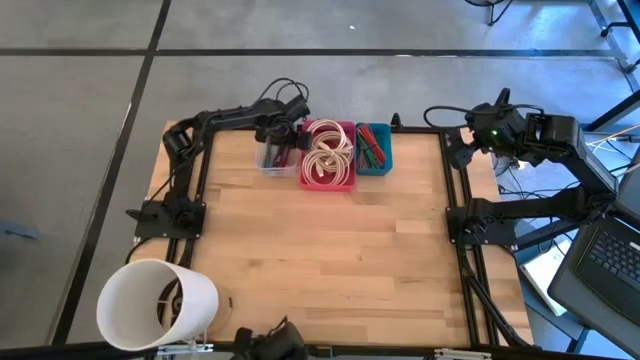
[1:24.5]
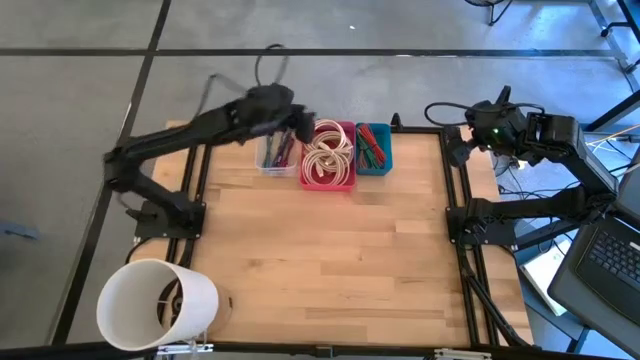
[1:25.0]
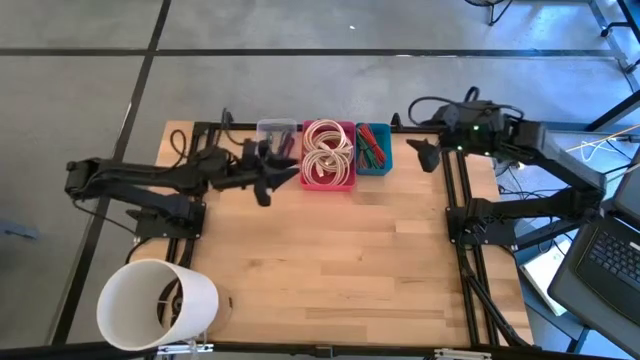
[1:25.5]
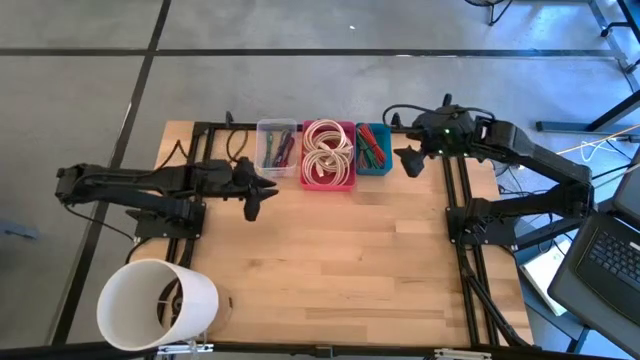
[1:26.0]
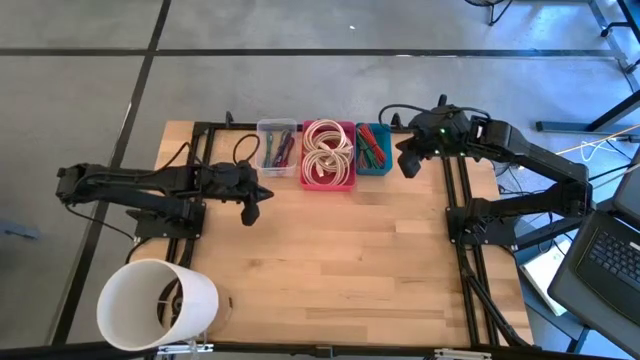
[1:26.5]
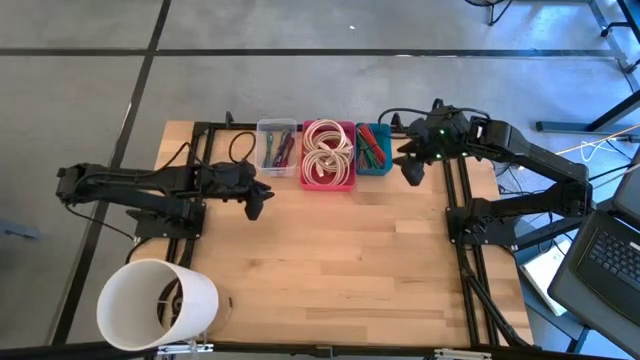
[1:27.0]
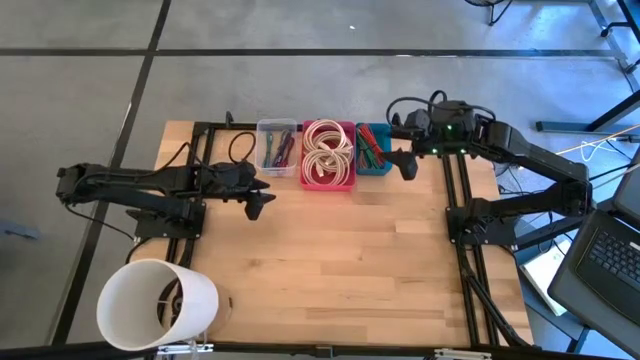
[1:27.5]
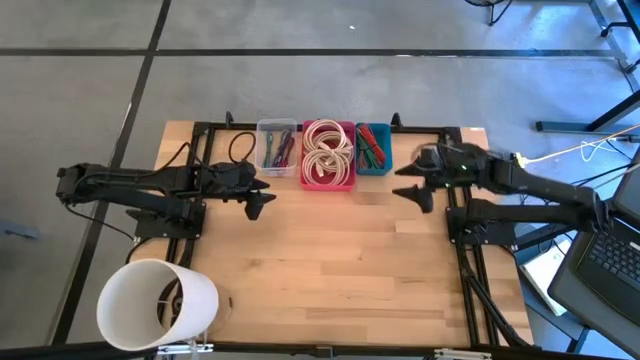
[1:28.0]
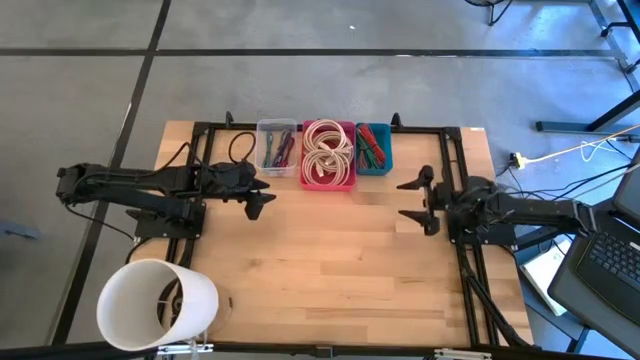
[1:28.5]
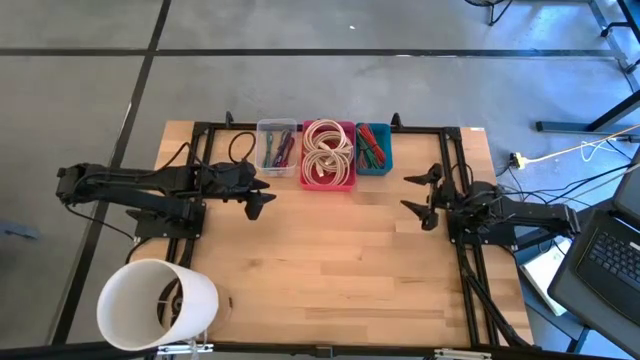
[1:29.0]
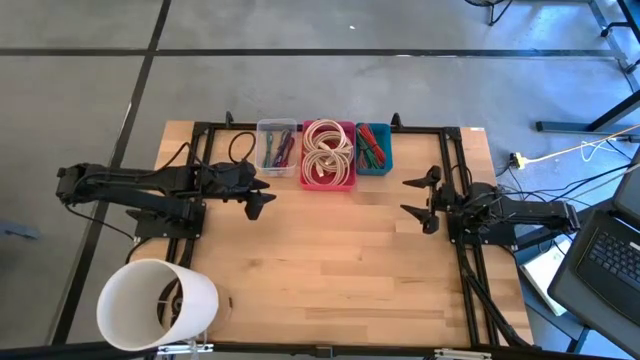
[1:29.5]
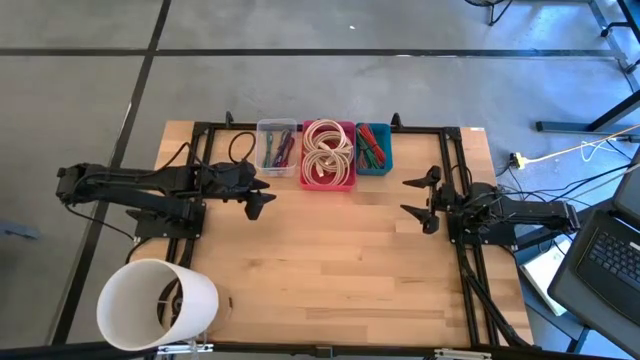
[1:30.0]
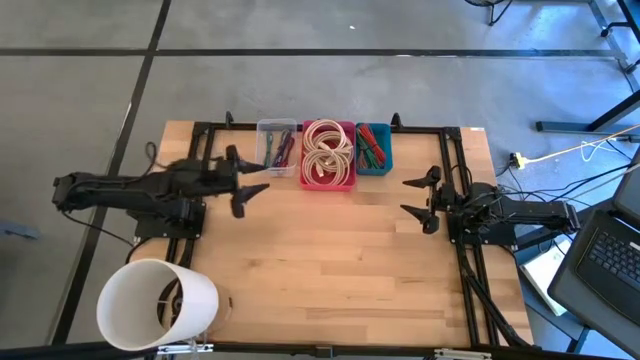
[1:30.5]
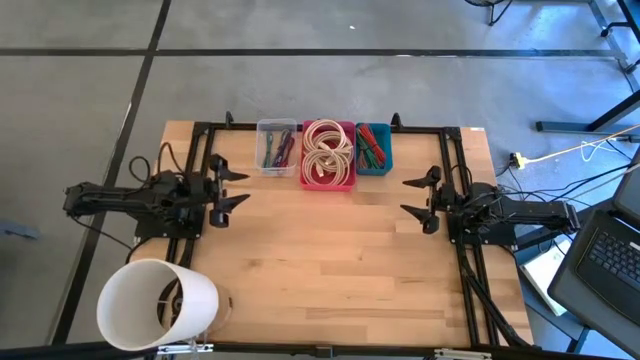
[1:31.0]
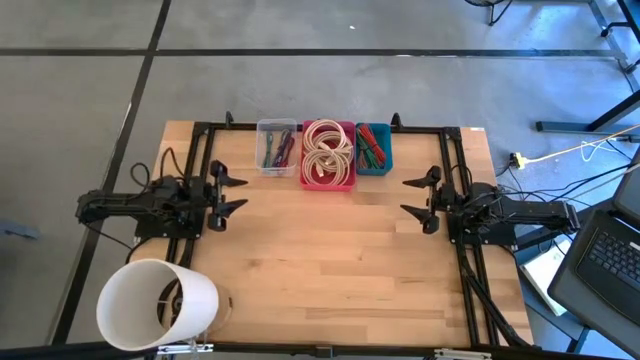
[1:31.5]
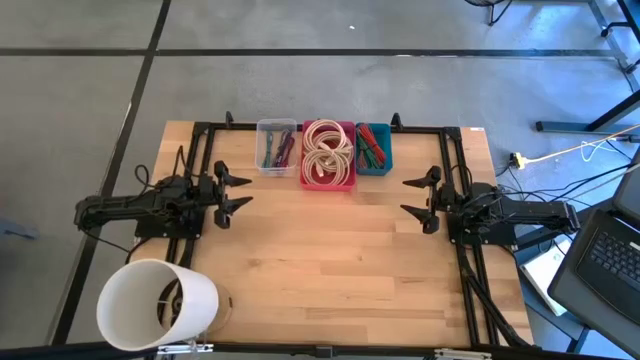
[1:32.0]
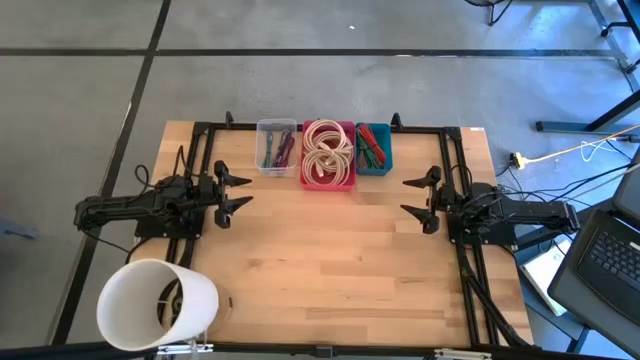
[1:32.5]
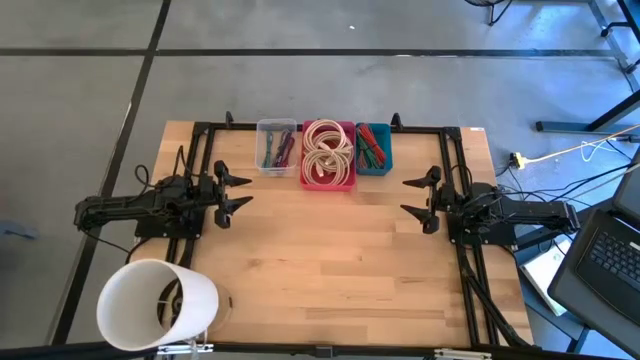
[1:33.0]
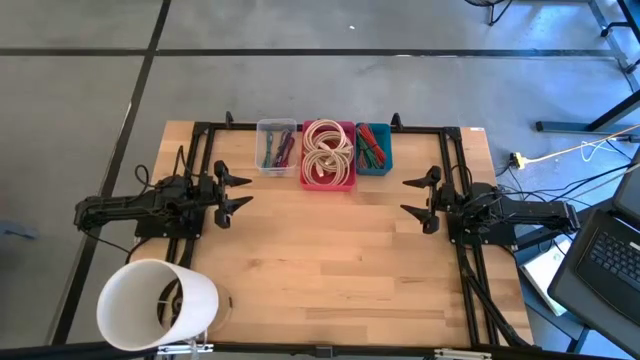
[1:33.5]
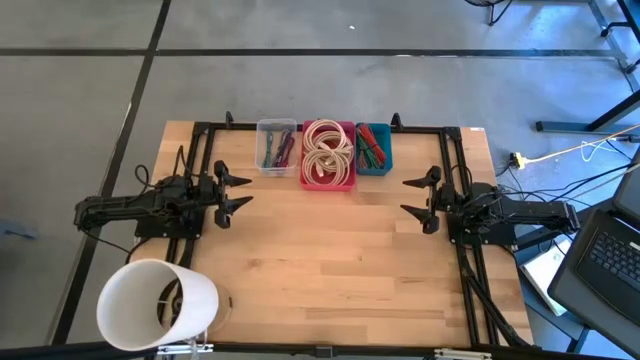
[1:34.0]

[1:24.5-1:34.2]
Task: Pick & Place USB Port
Return to Home Position

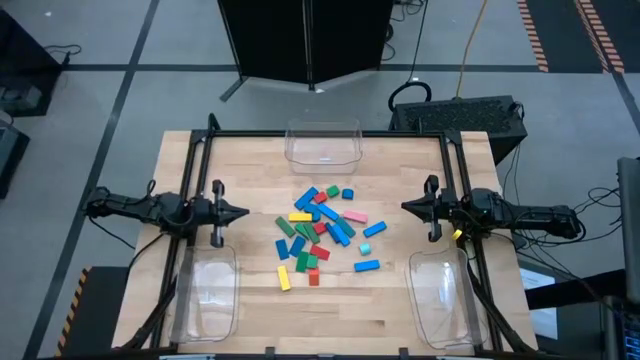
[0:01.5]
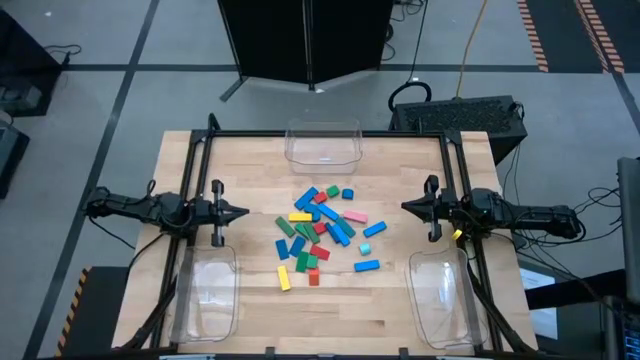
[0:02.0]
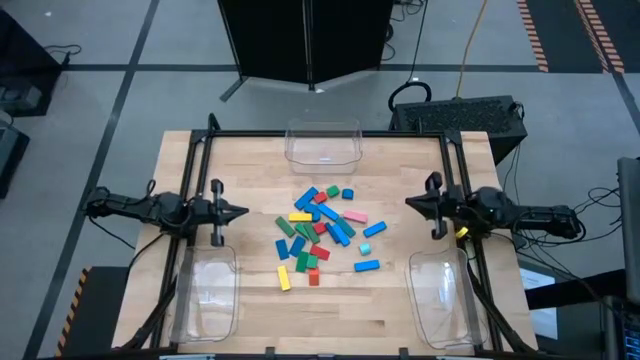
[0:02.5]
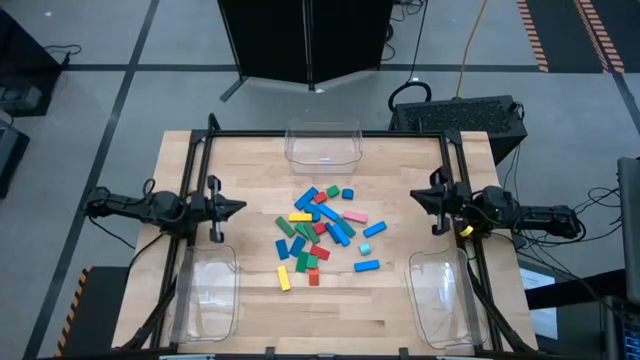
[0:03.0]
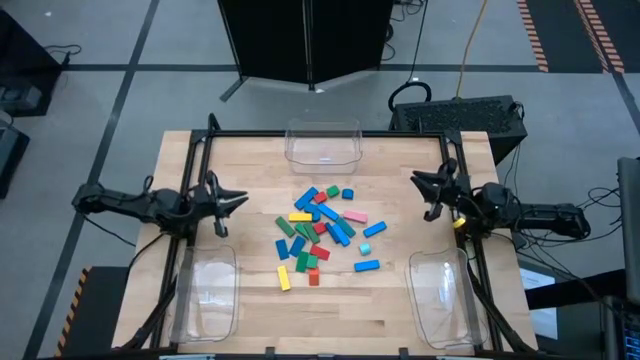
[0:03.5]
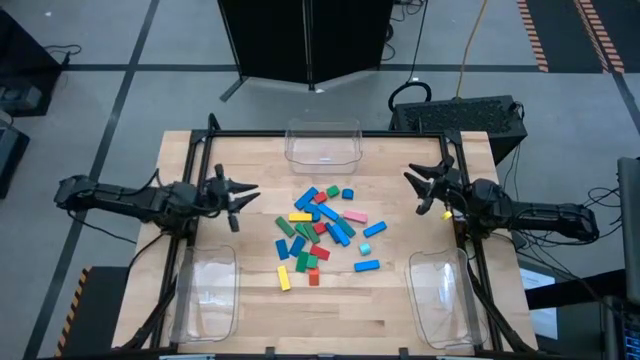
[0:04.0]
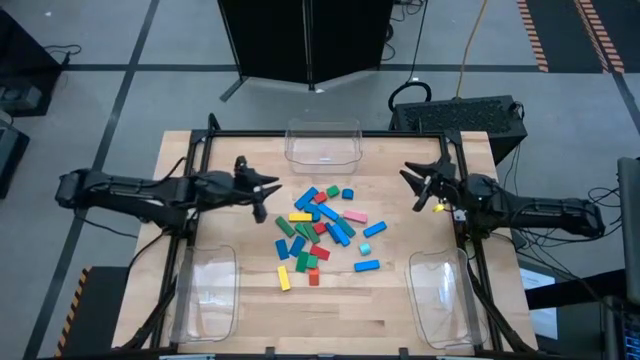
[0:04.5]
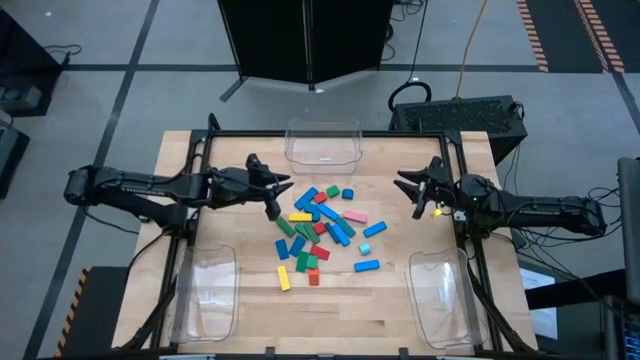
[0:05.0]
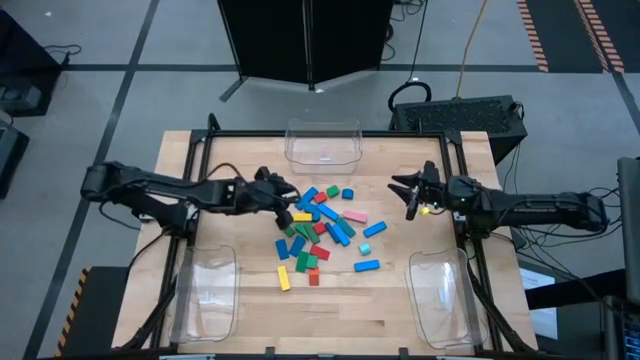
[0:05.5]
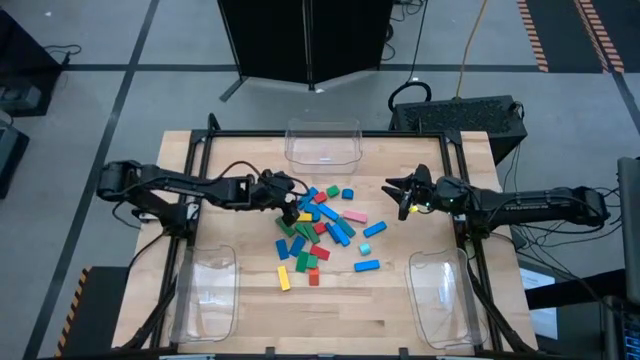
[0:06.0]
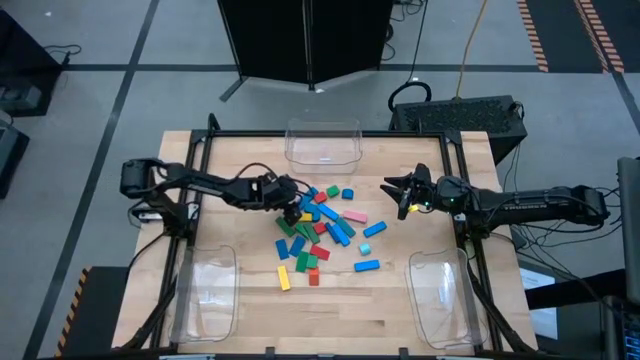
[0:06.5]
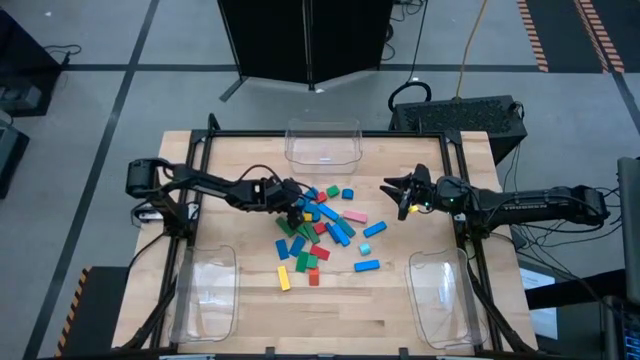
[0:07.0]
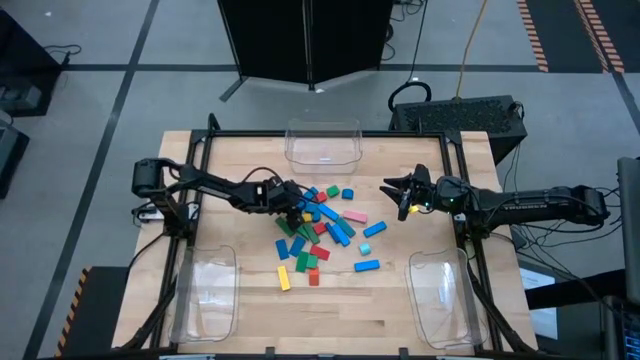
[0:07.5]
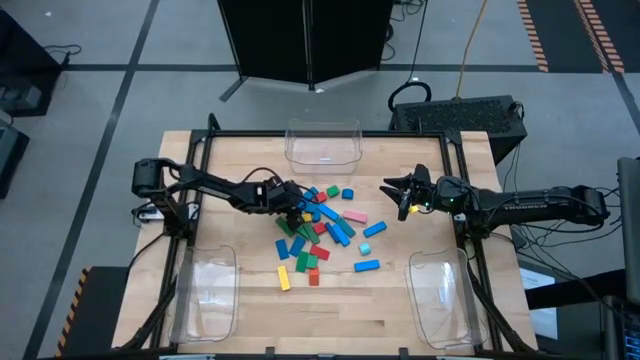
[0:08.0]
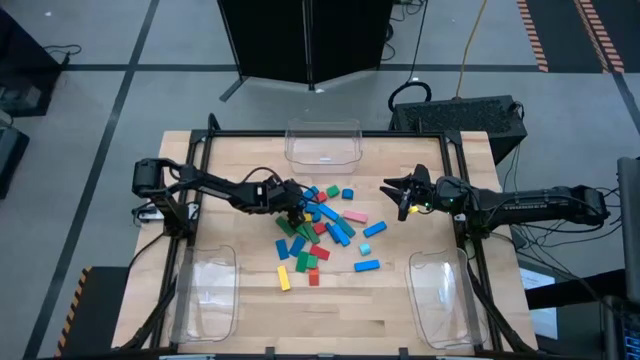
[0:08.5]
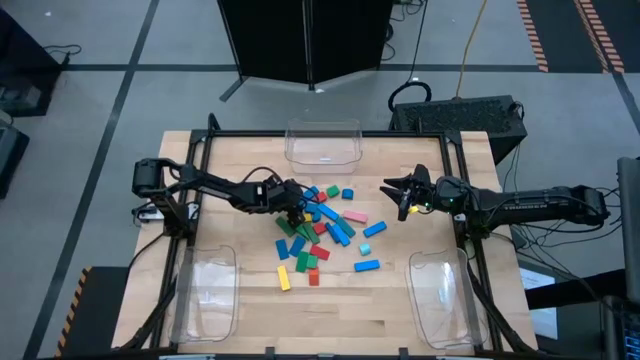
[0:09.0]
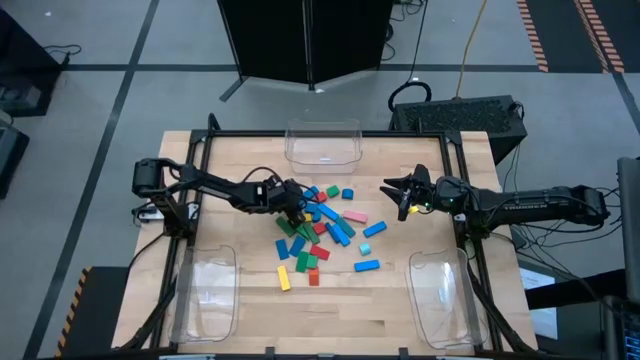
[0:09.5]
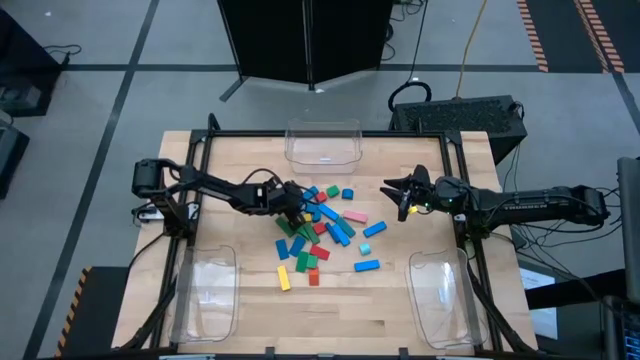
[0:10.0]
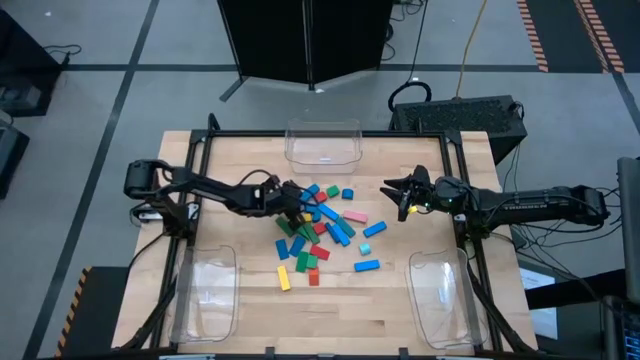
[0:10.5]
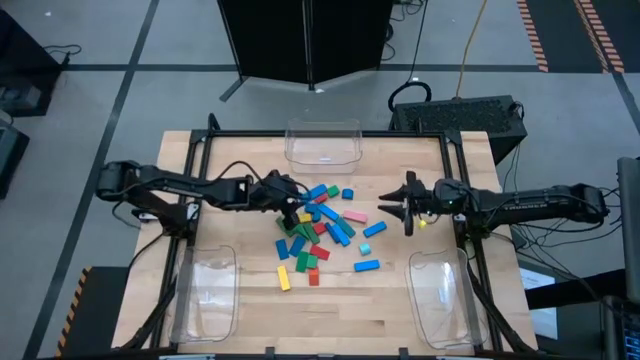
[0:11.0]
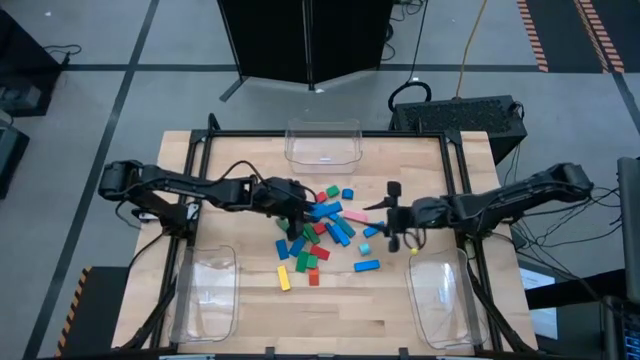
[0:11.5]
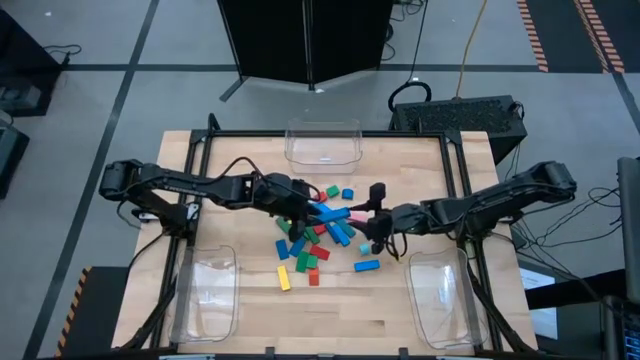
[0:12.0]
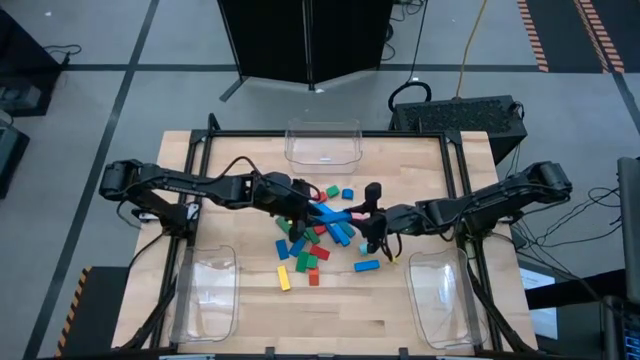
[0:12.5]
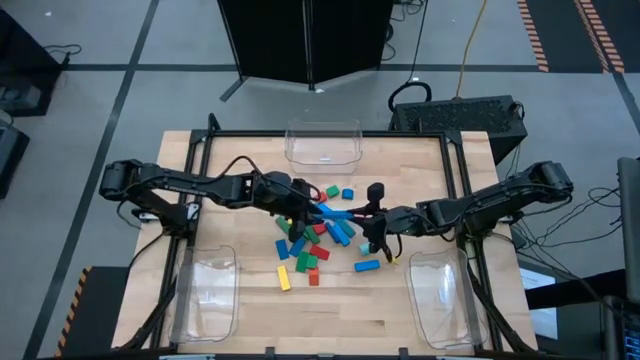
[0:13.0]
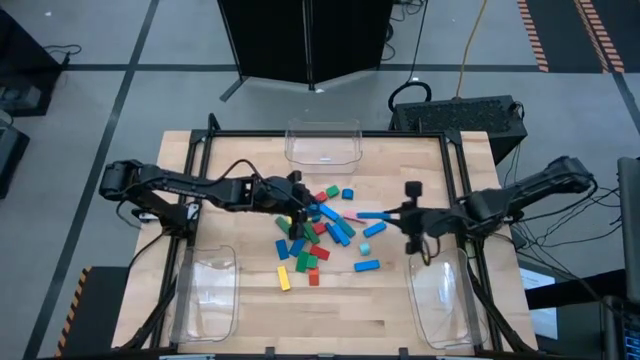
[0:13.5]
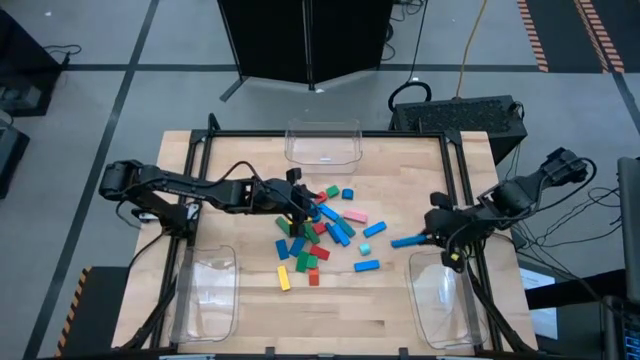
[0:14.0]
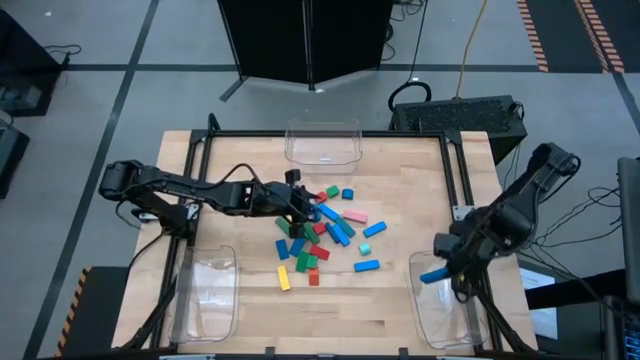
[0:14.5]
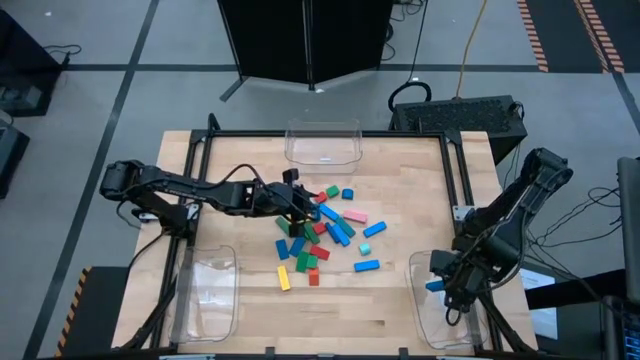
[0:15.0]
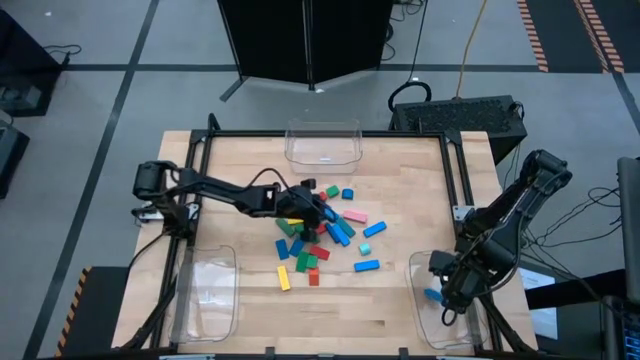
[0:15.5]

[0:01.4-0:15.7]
Task: Sort blocks by size
Put the dark blue rectangle block into the bottom right transparent bin
